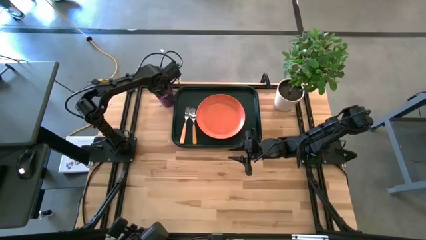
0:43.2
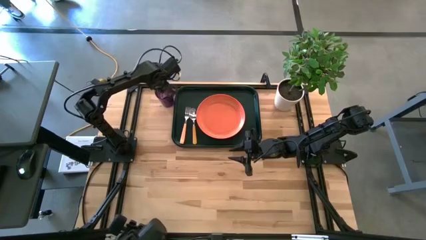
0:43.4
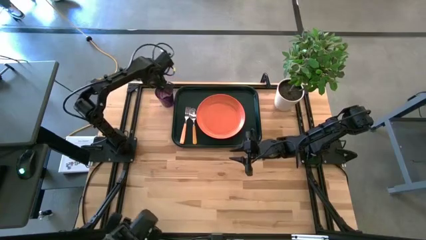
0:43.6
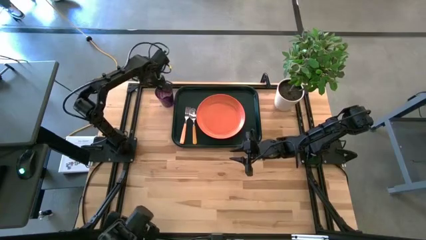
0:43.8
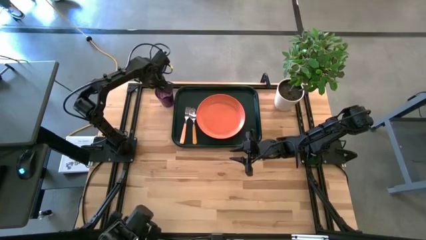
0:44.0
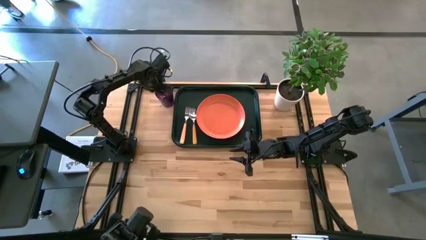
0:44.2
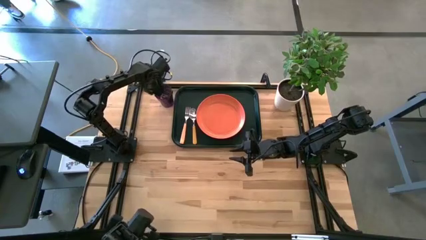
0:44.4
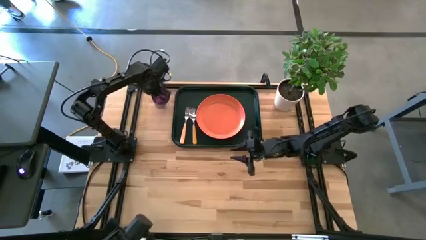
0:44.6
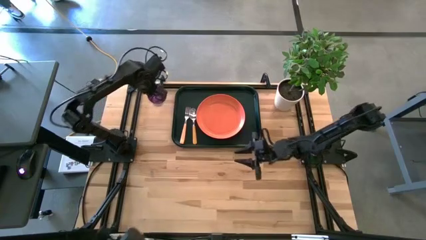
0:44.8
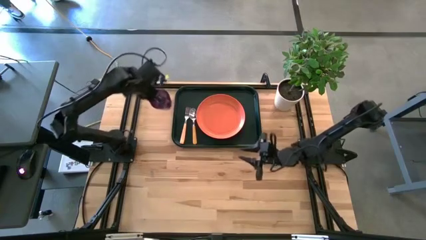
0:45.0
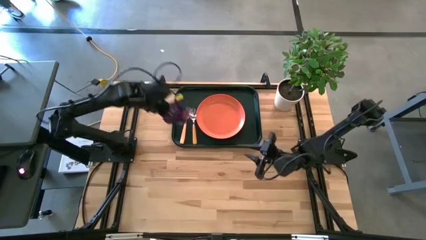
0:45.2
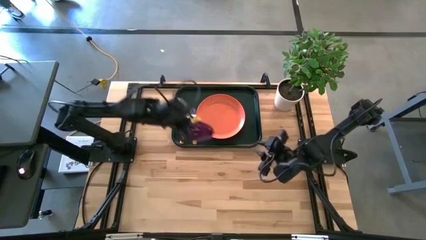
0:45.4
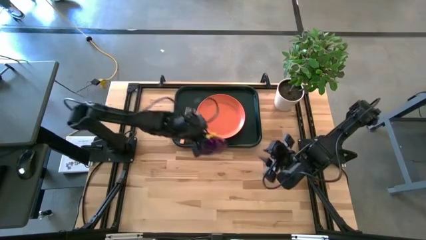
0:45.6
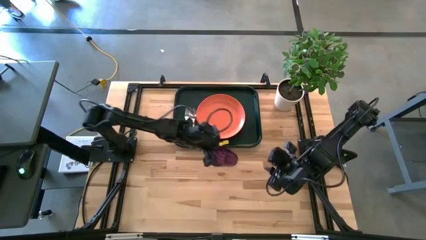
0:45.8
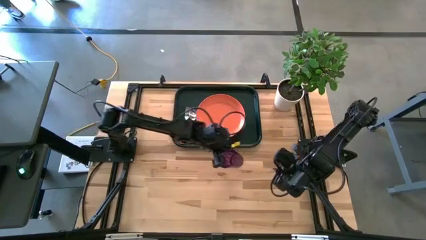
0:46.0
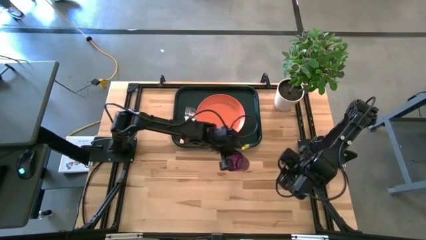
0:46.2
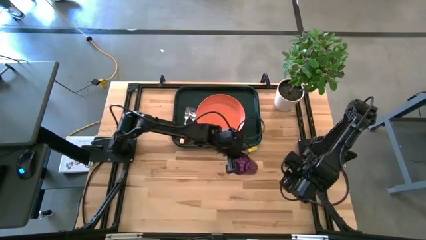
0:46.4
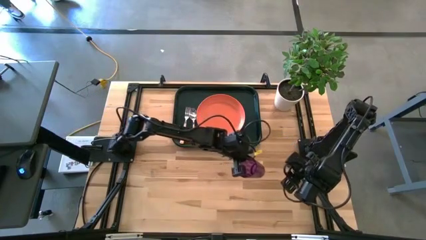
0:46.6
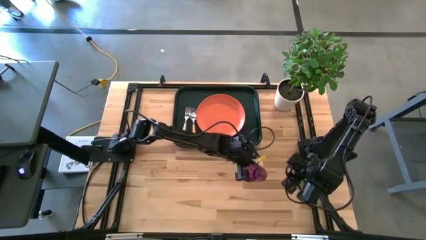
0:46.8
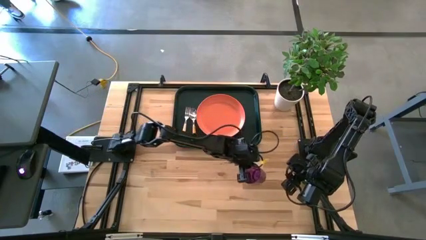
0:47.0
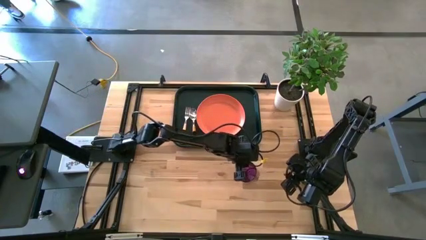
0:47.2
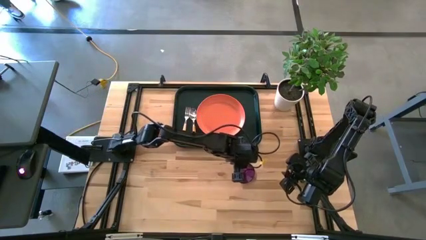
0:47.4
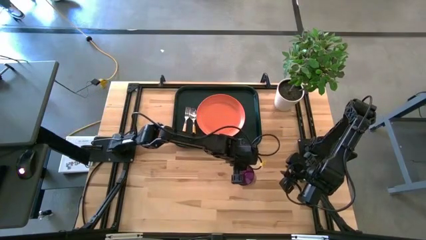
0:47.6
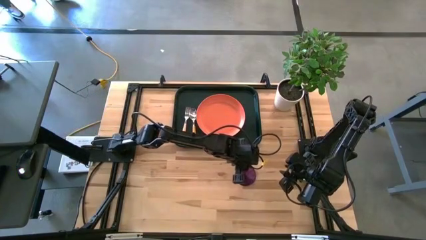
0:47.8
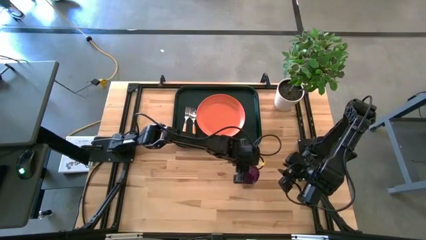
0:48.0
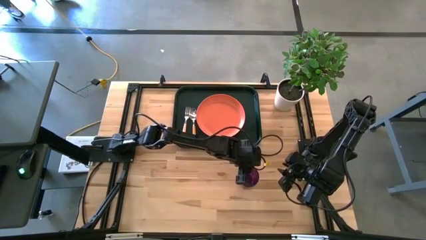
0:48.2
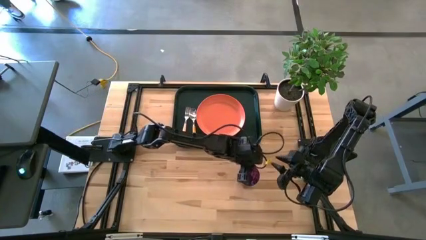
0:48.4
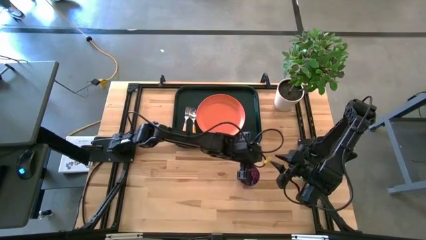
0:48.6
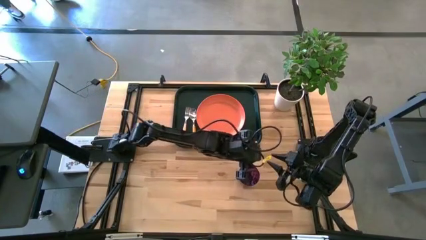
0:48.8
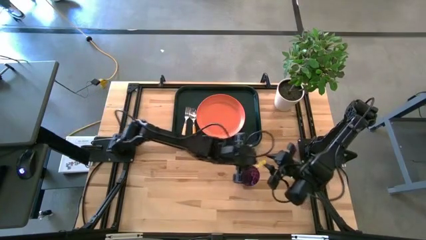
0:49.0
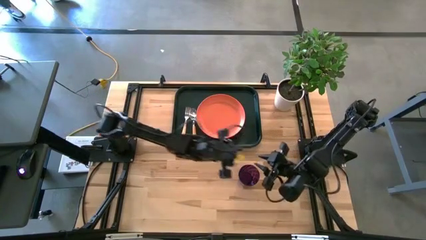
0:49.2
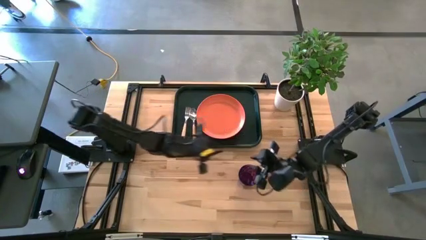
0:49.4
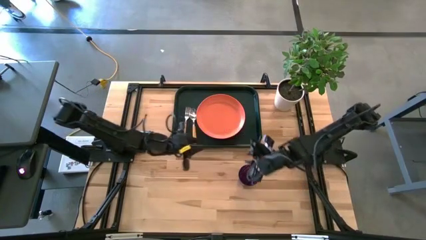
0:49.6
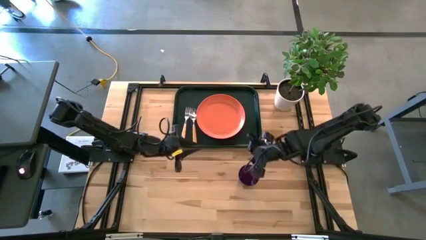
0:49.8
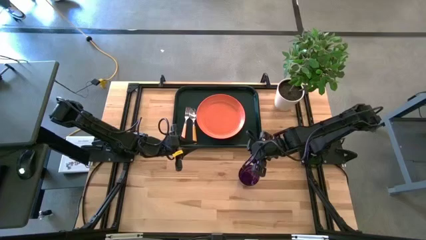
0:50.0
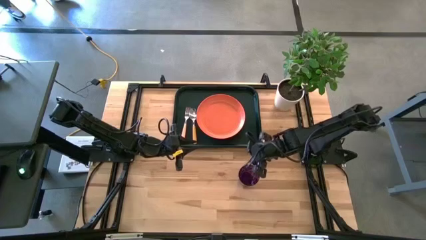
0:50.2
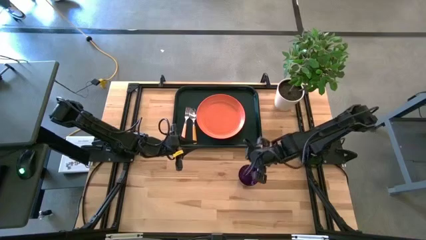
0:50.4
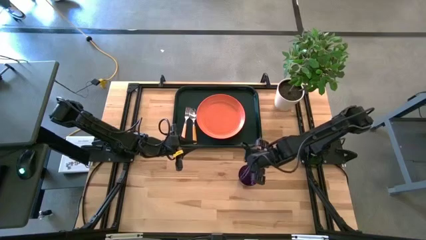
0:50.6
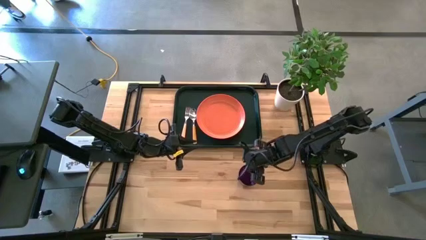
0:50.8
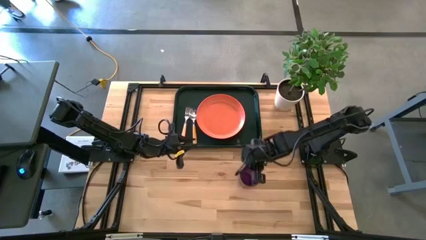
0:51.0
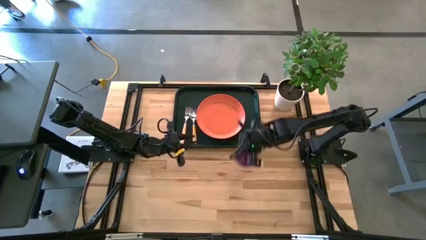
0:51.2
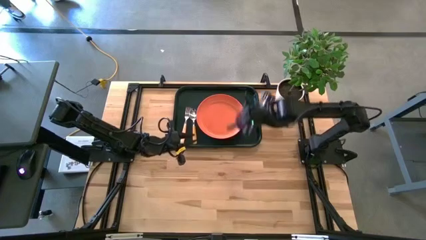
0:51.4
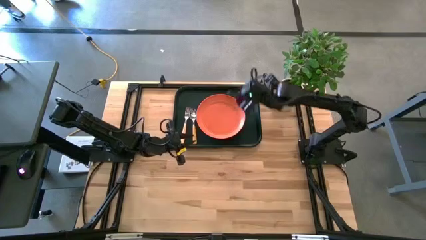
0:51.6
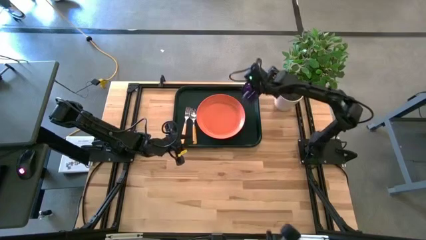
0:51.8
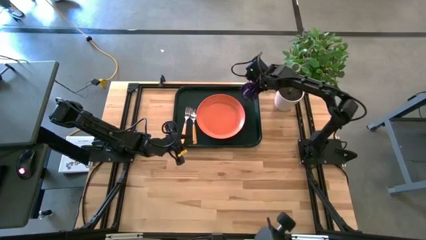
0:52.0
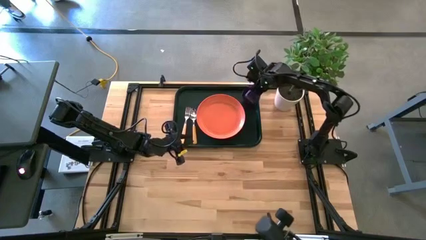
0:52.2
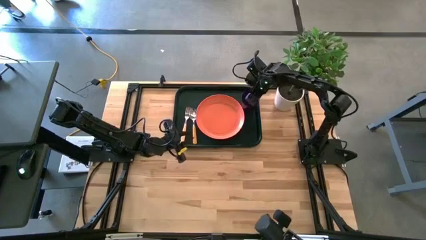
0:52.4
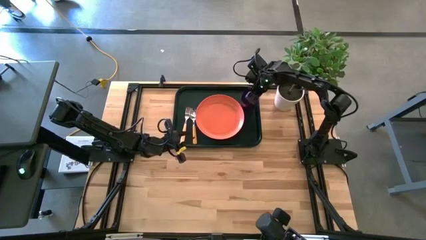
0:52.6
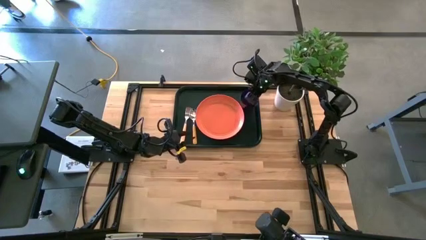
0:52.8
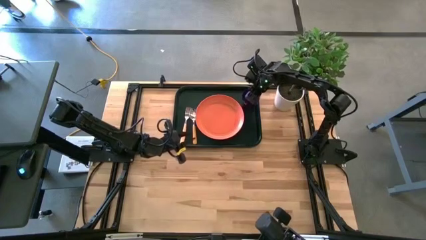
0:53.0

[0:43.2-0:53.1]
Task: Pick and place plate/cup/fork/spoon on tray
Put the purple glass on the black serving tray to the top right of the orange plate

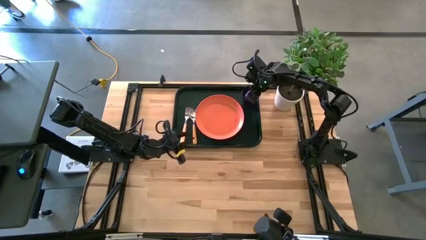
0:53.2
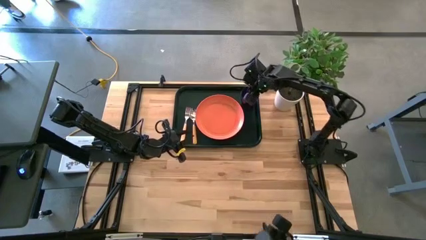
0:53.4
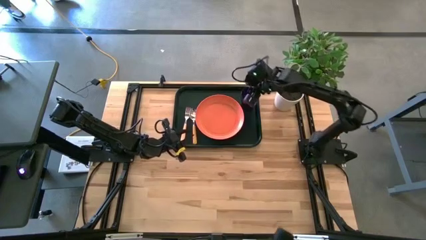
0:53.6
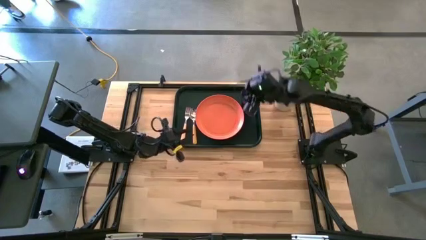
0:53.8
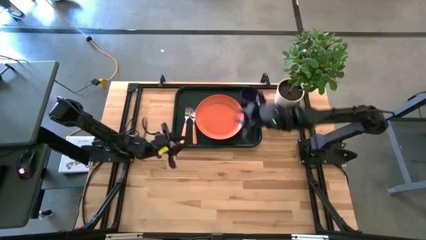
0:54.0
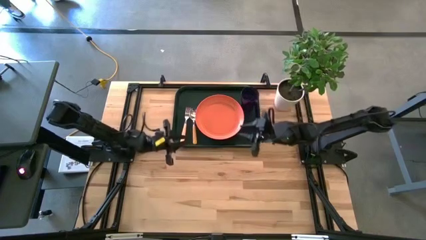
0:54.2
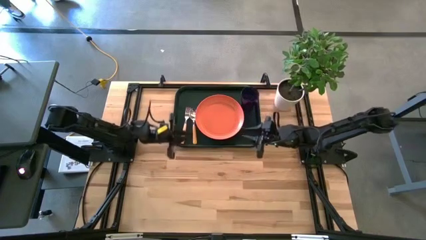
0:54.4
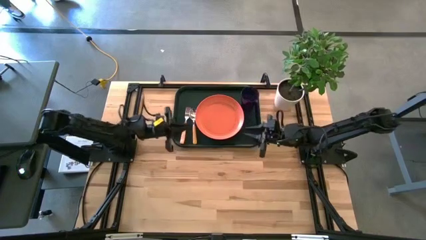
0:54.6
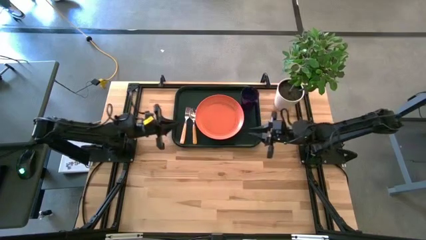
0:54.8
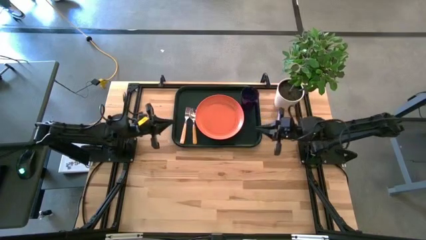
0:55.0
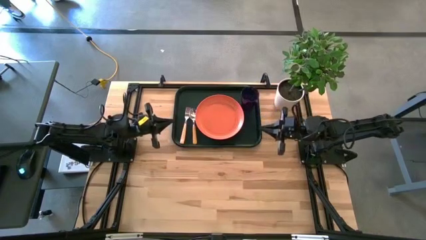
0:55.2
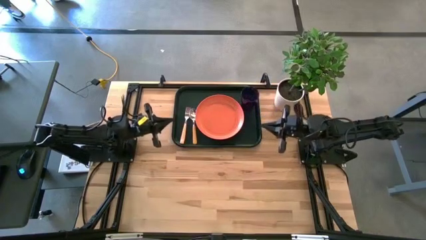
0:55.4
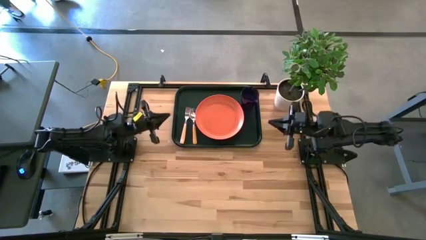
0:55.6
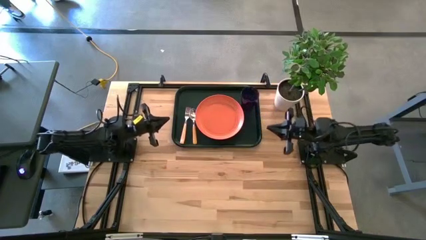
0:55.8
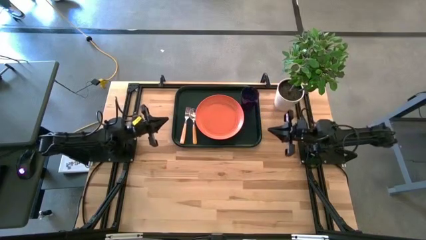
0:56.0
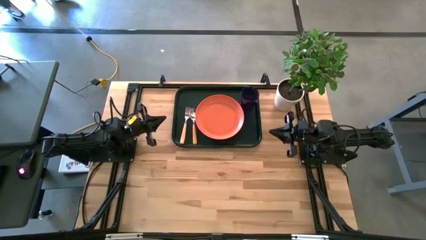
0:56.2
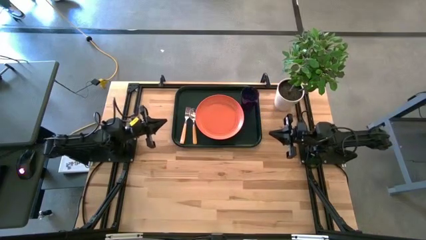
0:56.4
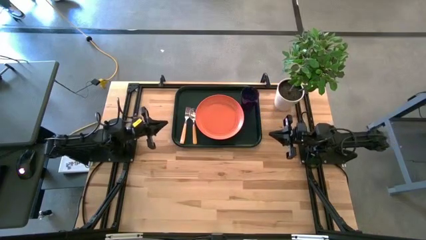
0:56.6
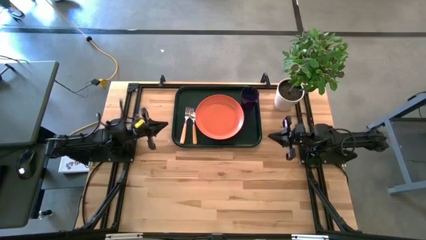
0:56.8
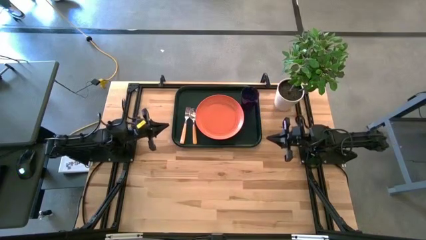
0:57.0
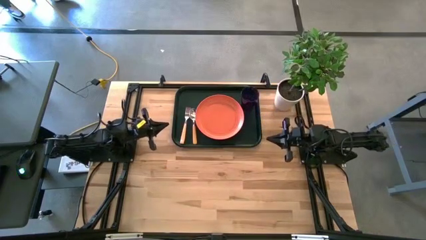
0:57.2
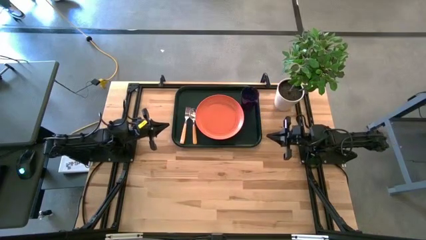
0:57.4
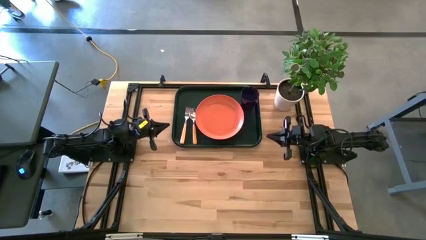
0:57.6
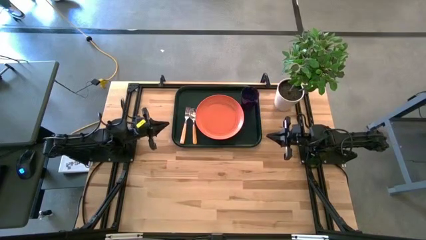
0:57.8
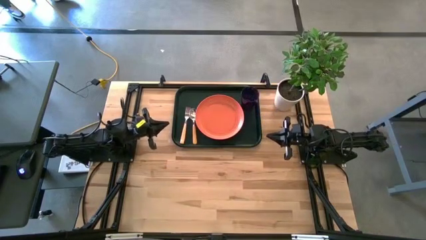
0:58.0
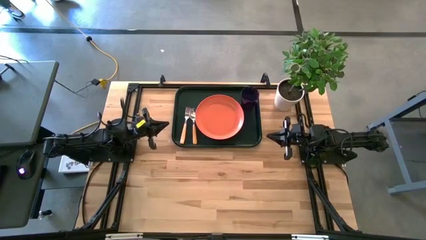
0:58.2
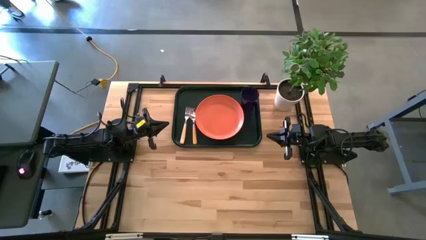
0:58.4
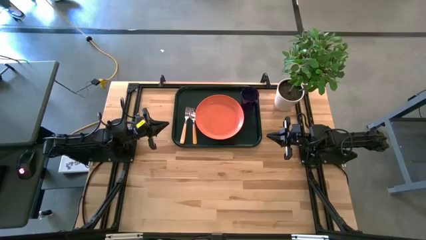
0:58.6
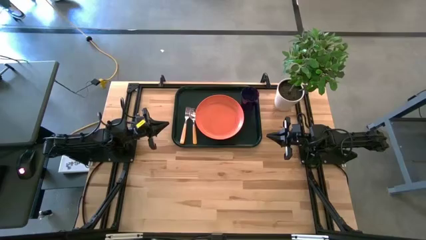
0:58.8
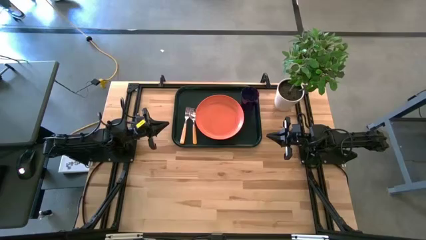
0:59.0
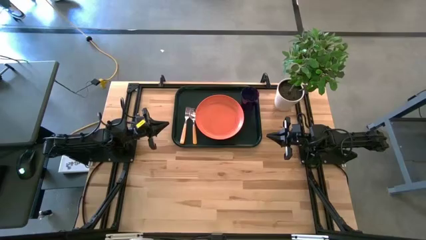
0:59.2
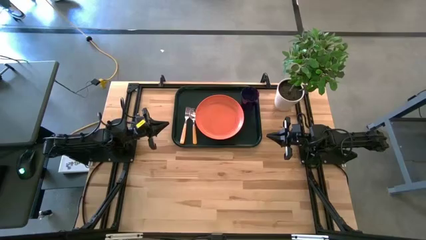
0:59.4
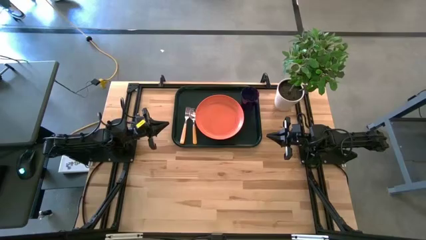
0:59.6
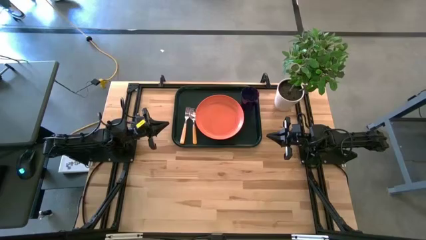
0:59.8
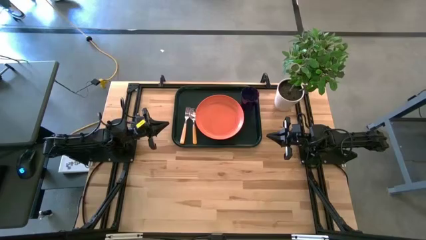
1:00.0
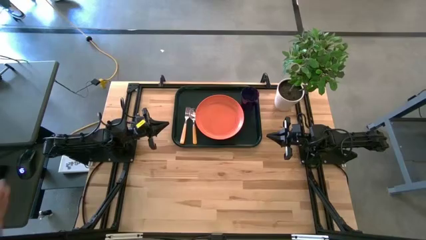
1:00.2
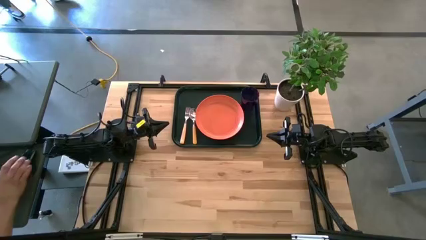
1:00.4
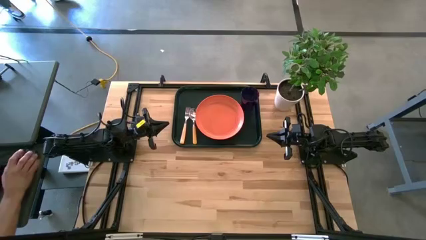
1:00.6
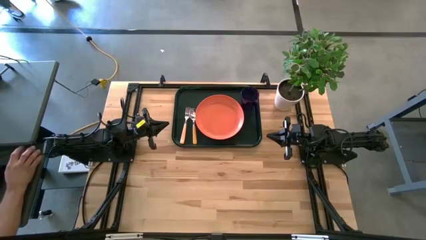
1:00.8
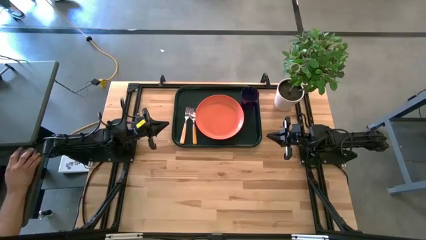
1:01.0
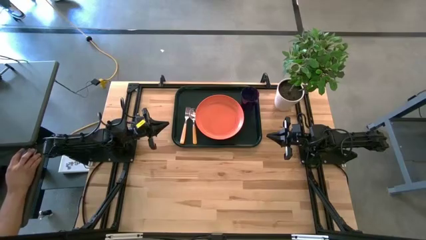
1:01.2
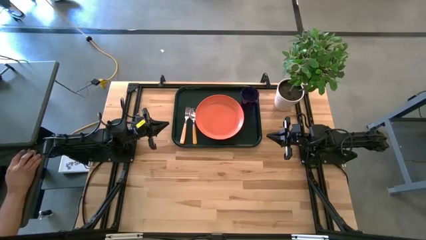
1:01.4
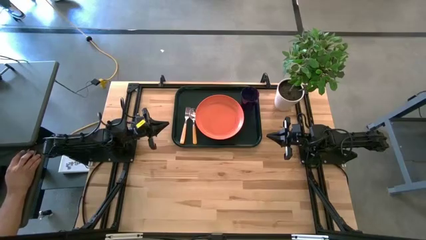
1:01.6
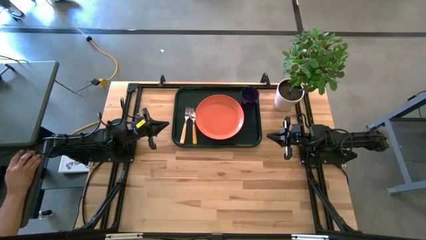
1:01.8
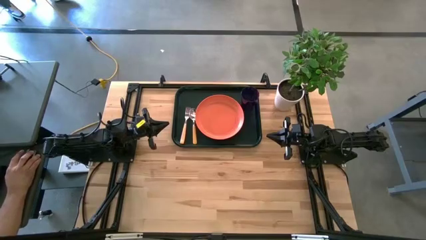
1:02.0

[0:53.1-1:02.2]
Return to Home Position
